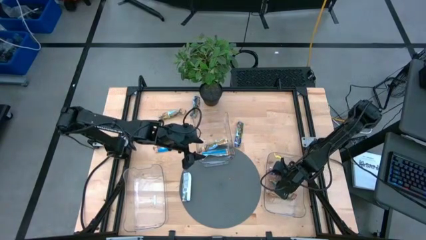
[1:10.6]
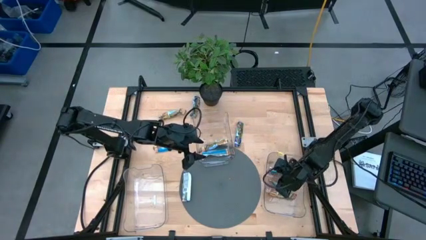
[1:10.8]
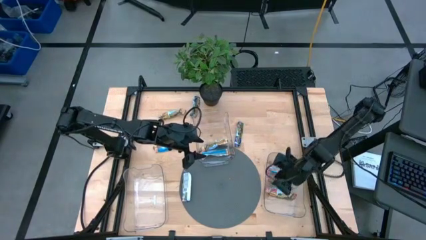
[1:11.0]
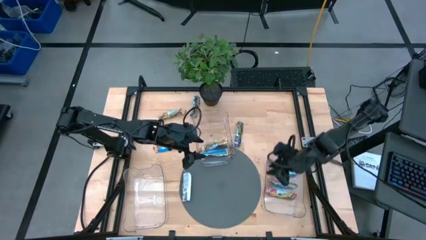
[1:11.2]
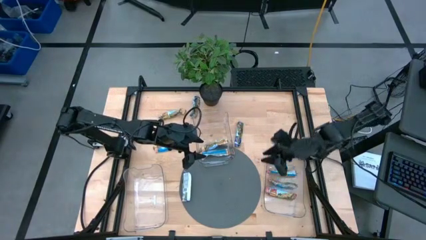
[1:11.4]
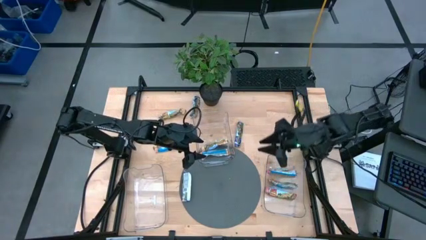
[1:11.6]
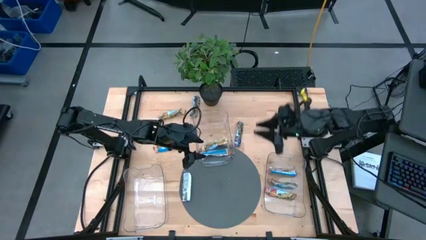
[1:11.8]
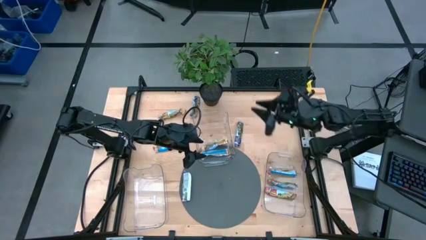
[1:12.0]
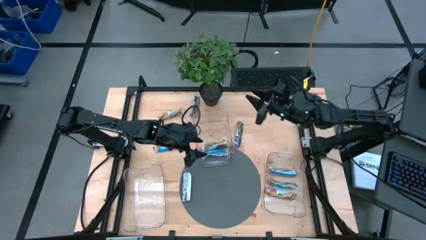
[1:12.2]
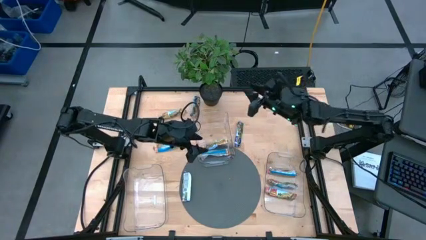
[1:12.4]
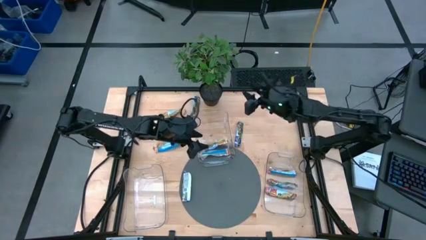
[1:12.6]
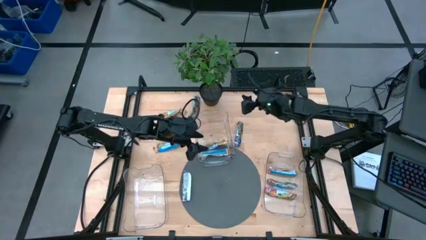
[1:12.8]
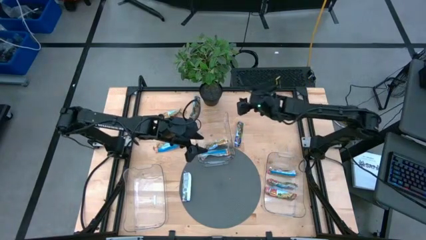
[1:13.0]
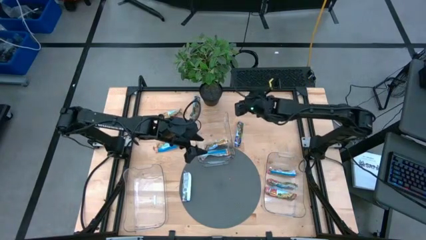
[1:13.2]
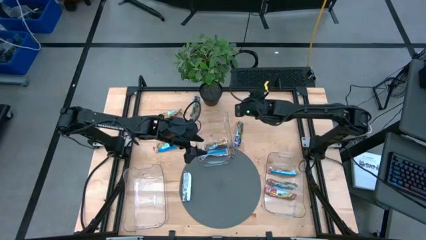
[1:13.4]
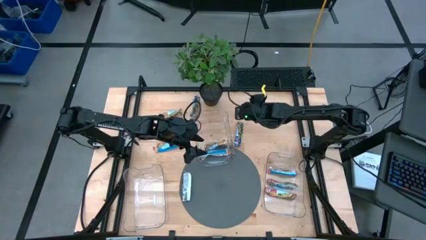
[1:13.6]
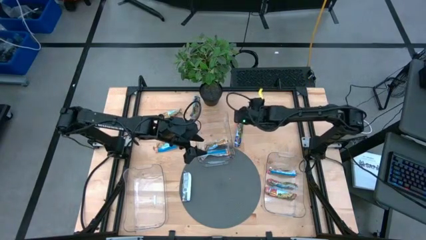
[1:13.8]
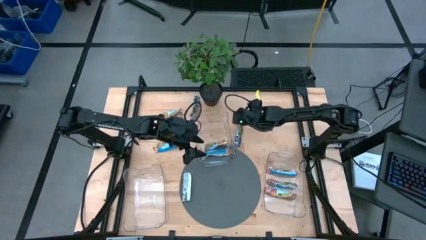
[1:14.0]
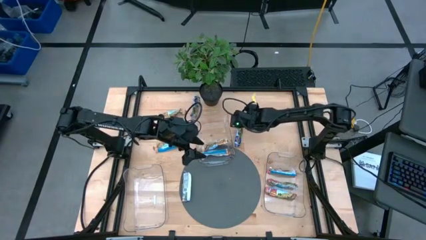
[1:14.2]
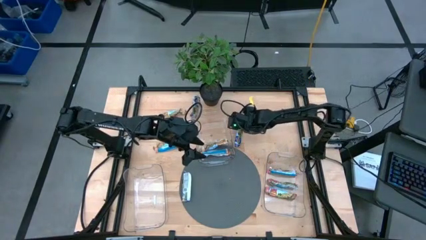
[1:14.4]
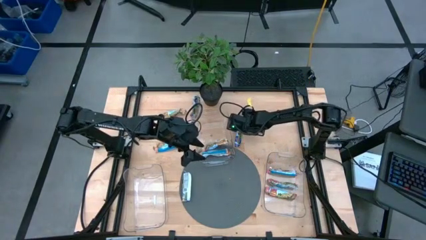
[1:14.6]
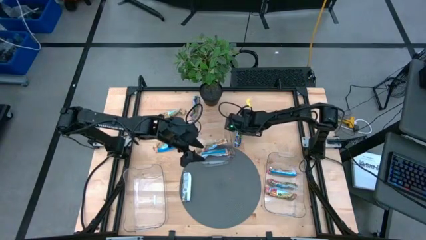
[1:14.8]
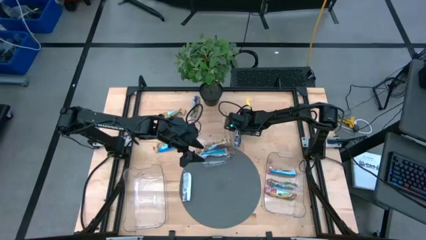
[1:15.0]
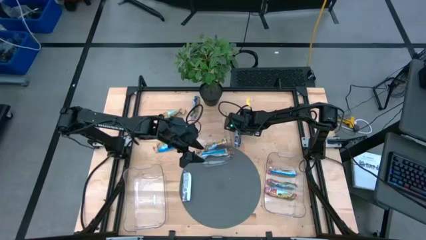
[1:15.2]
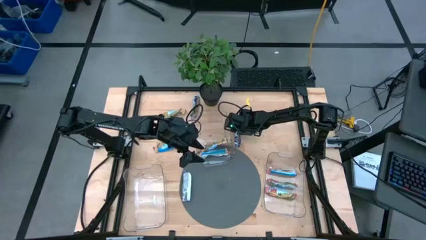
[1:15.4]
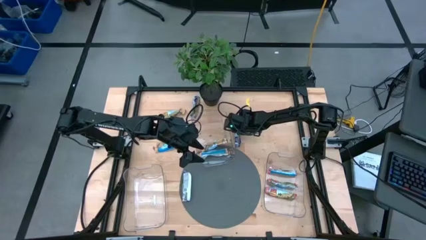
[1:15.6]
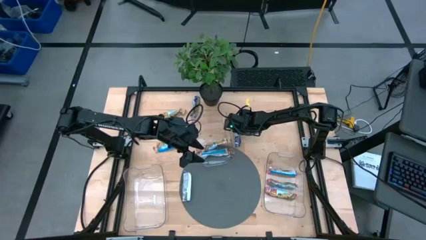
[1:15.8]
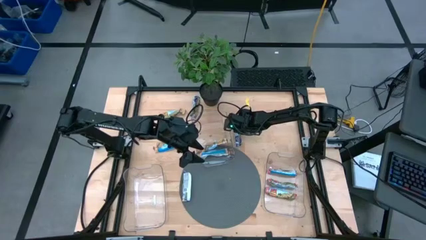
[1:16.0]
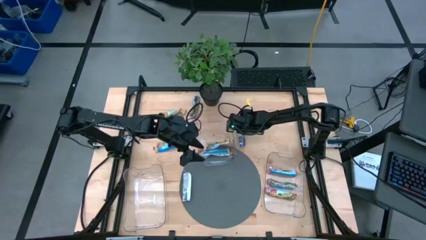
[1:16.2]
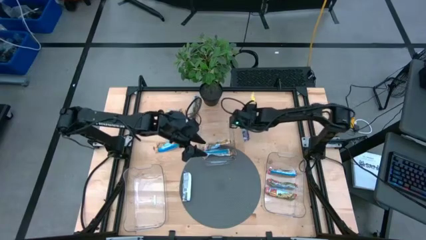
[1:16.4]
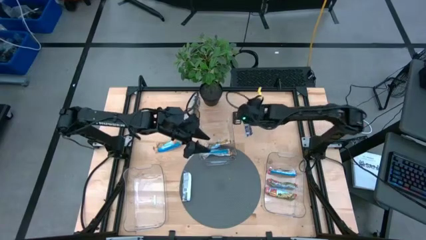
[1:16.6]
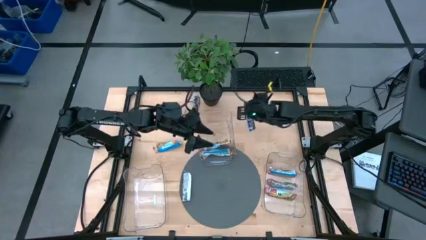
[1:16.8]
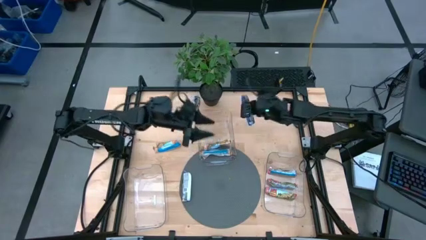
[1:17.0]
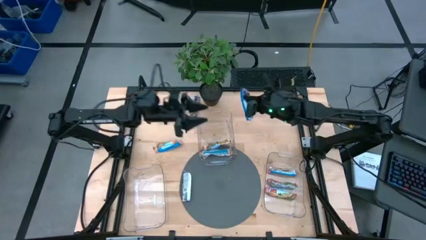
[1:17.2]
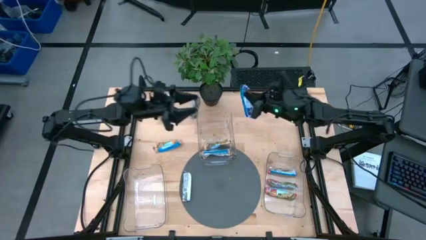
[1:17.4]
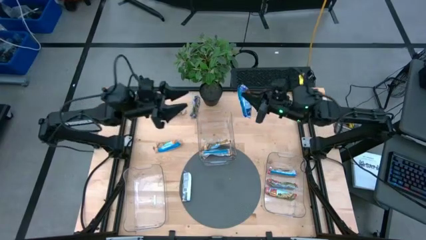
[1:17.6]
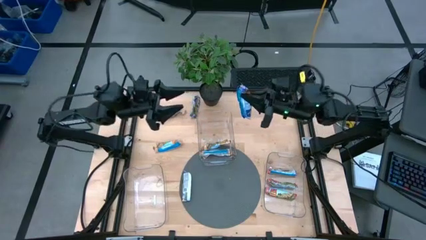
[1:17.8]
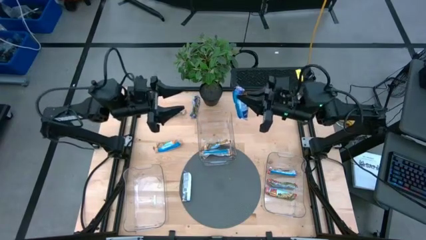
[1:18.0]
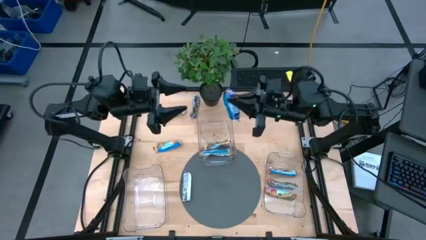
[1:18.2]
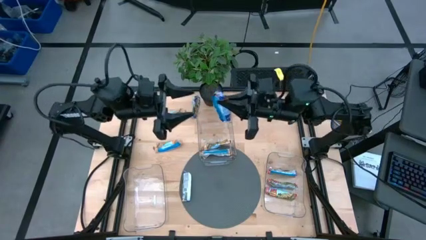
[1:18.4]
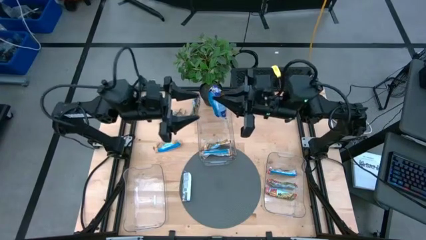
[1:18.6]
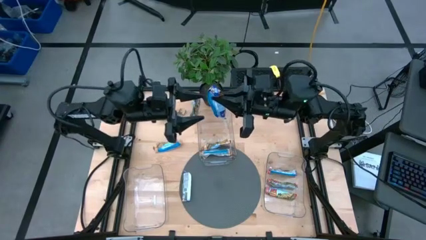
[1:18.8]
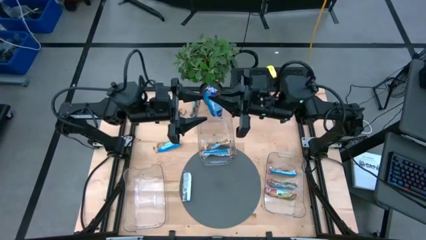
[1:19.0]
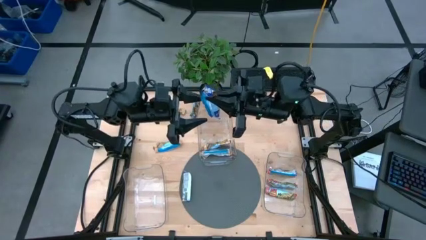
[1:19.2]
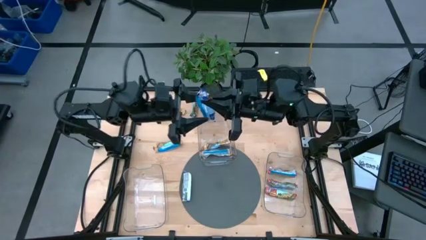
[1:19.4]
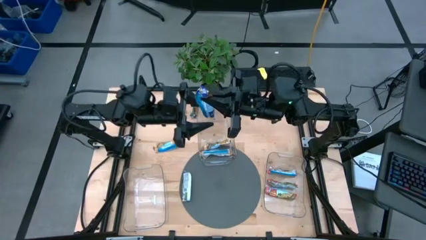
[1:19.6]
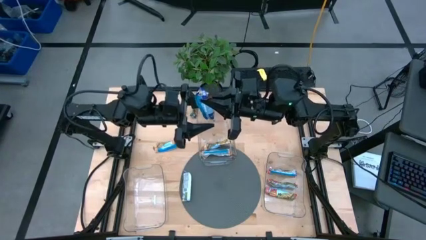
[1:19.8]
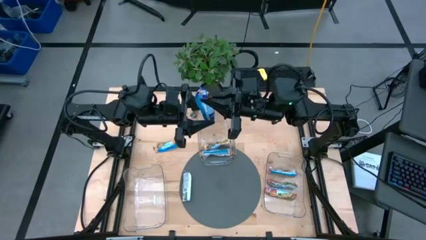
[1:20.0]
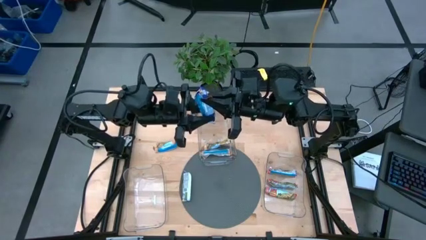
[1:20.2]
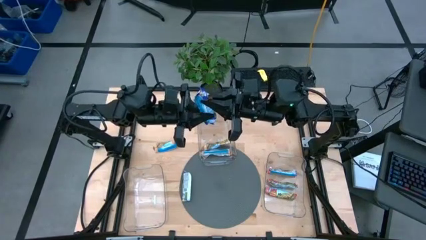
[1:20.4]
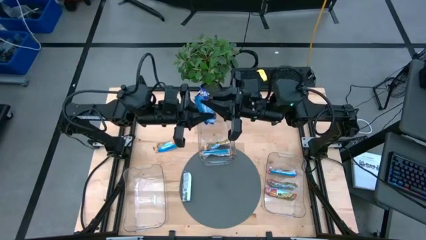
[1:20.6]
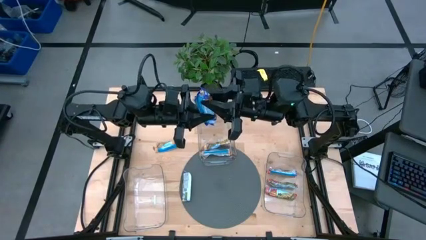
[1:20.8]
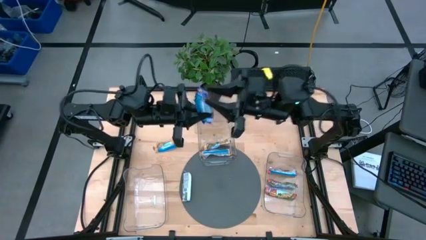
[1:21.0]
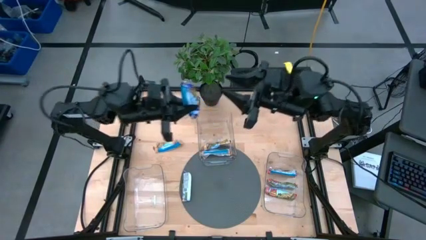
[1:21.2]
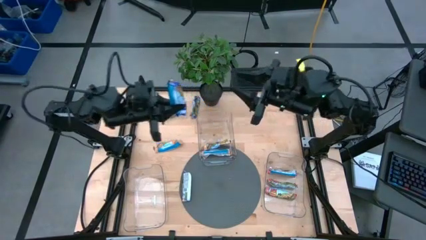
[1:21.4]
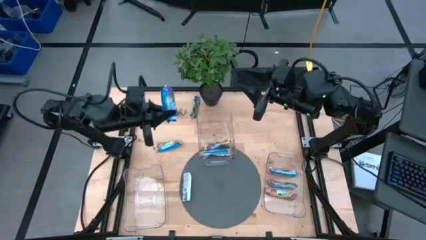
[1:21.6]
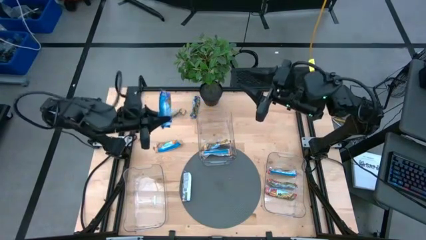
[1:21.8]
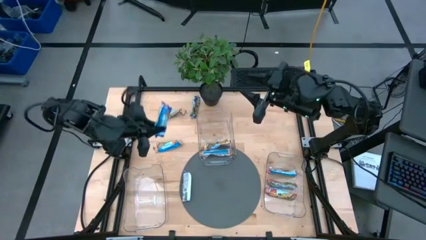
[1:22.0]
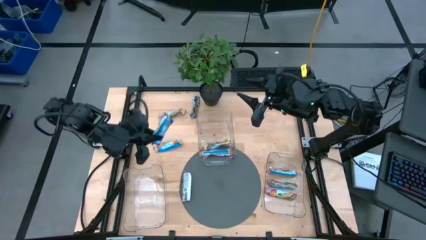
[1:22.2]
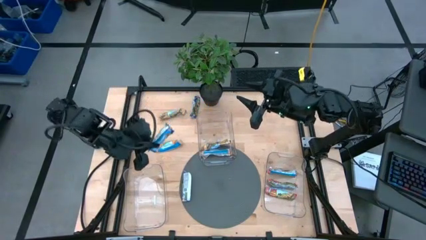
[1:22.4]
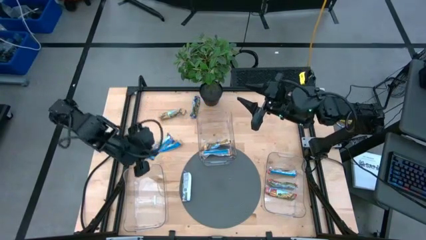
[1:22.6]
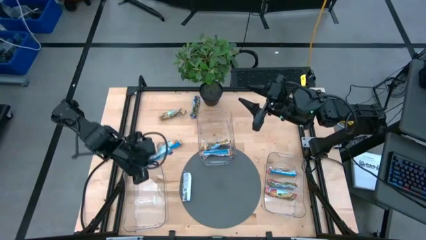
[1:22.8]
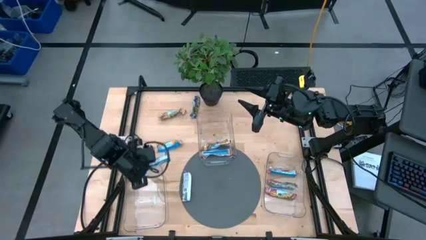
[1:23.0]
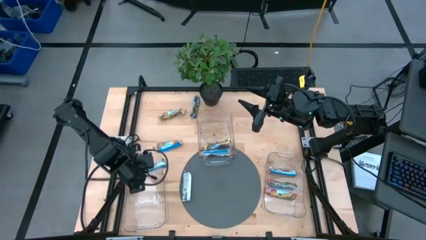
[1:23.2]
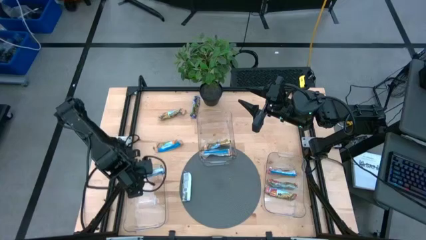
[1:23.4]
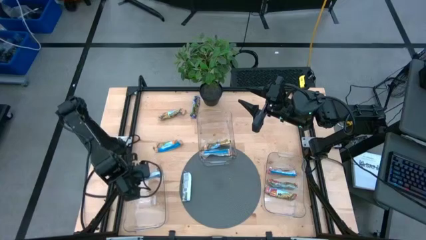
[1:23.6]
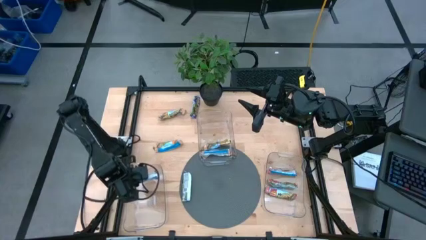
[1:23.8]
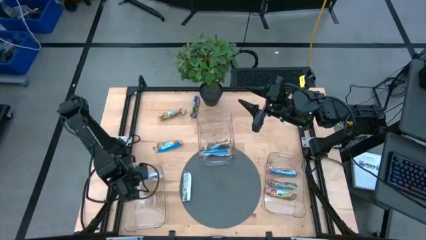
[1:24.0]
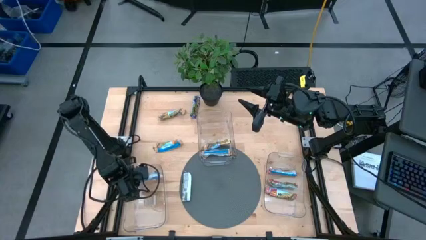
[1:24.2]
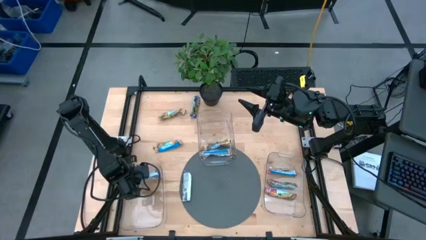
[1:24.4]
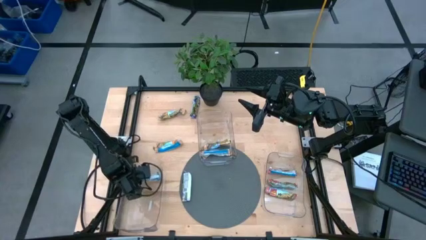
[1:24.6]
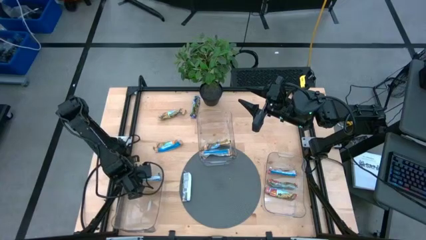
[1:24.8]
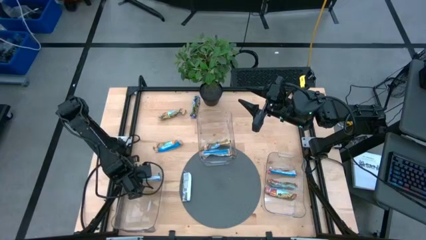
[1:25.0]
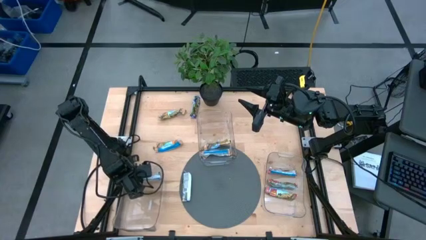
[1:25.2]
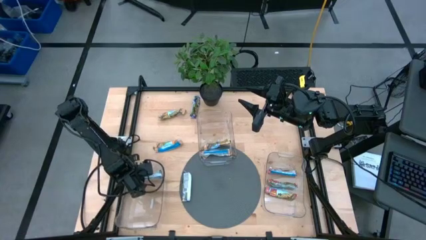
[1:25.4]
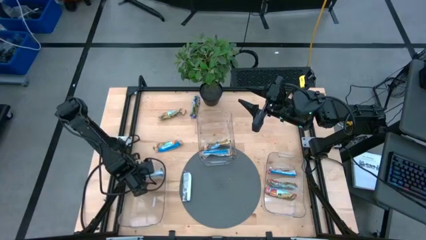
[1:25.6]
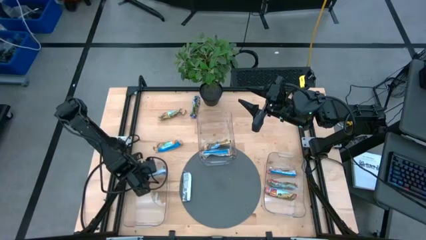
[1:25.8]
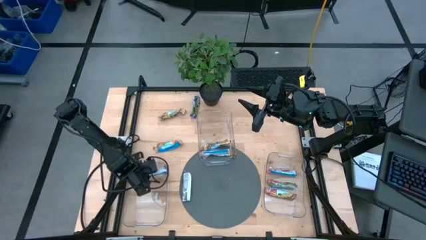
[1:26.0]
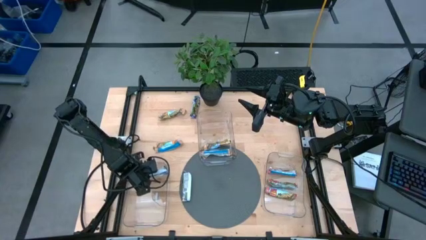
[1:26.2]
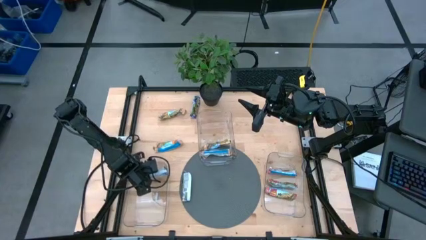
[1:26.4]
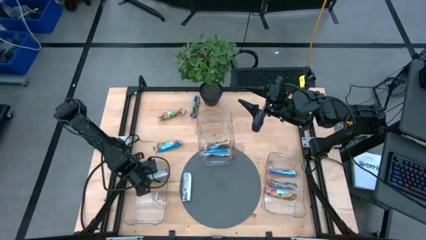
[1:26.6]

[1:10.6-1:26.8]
Task: Pick and place Granola Bars by type
Put the middle green granola bar into the left transparent bin
